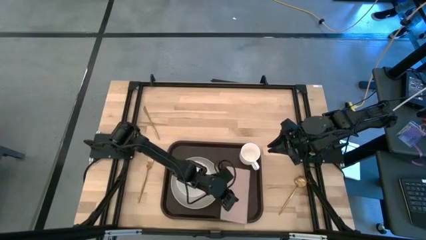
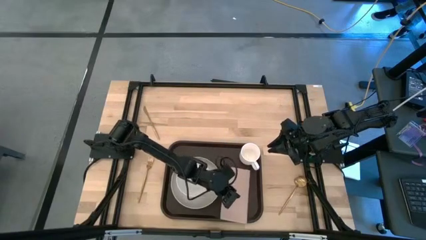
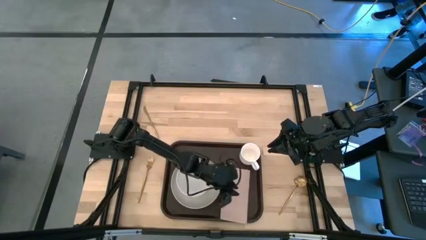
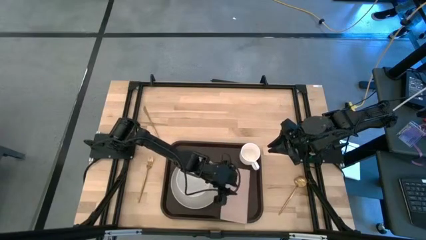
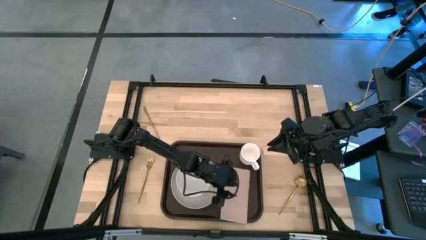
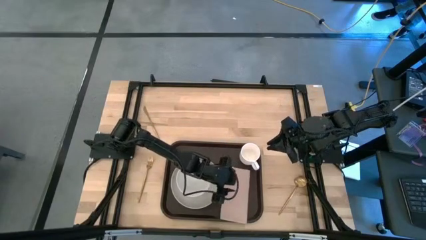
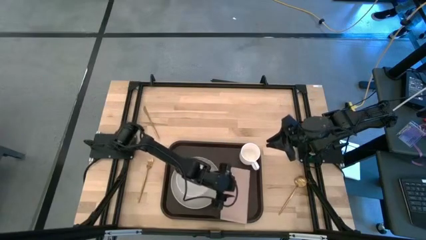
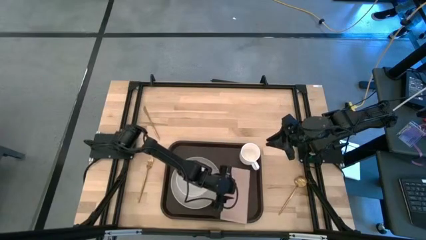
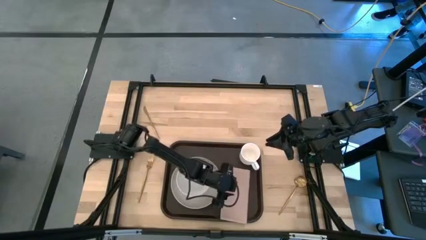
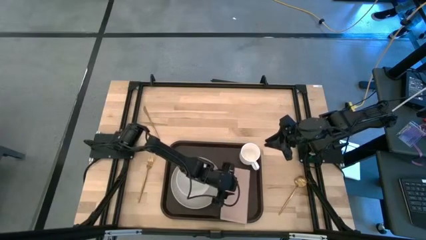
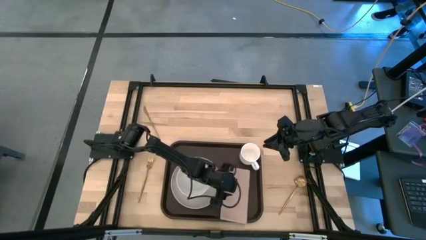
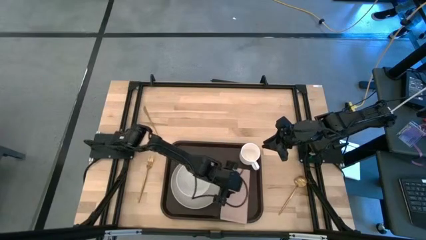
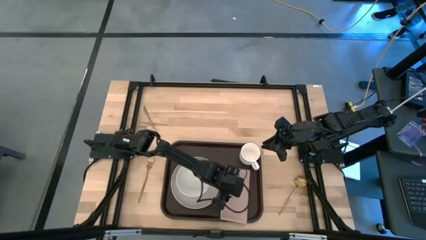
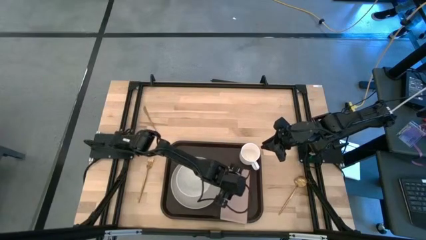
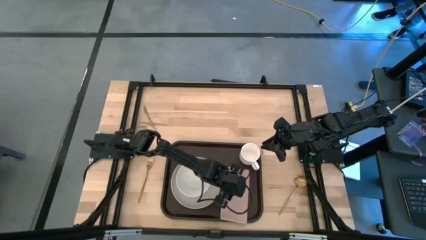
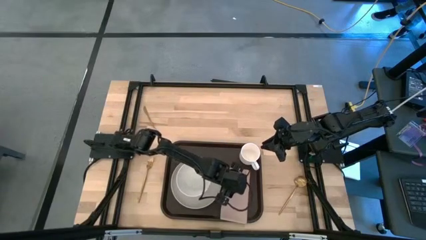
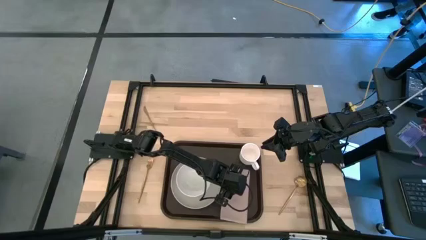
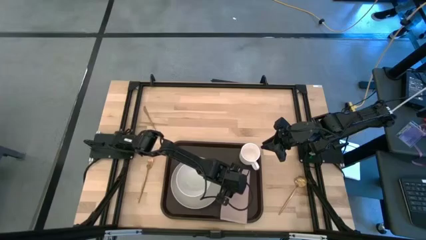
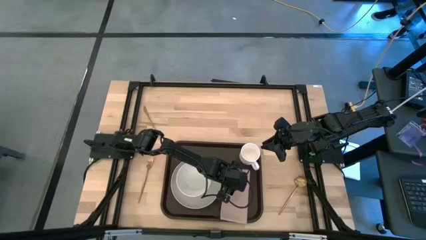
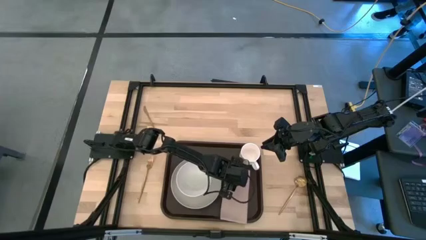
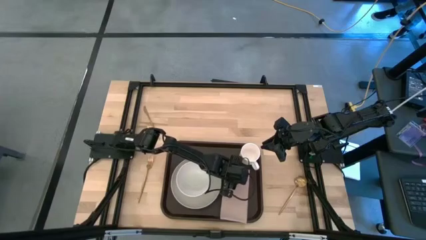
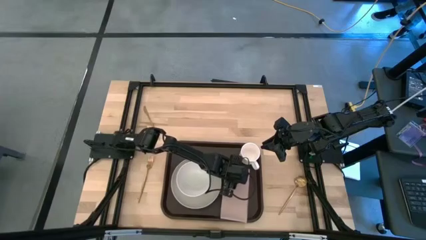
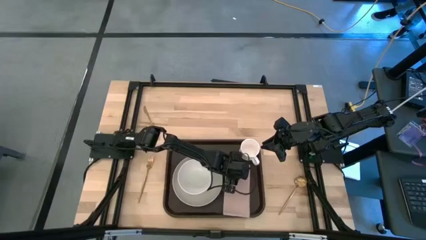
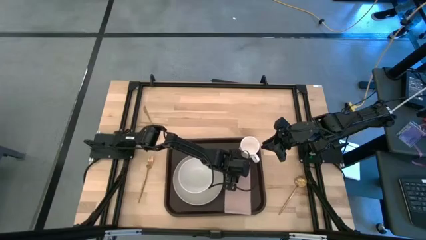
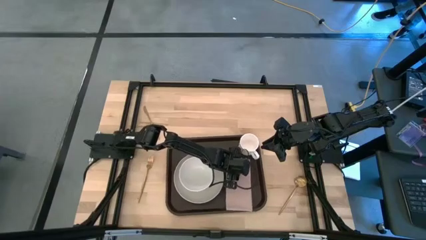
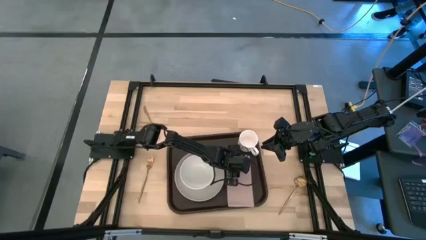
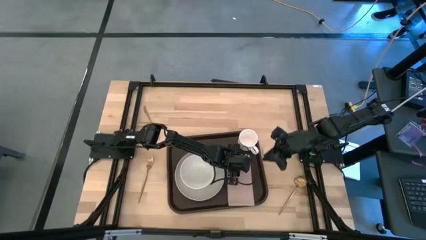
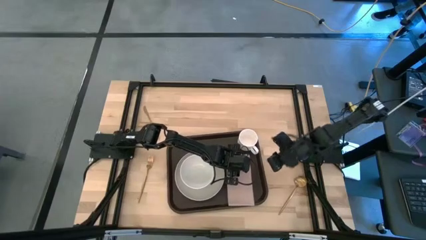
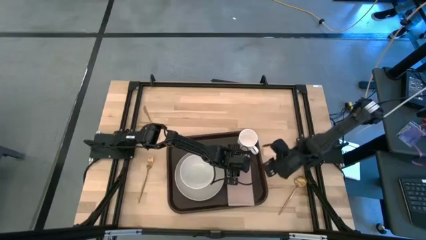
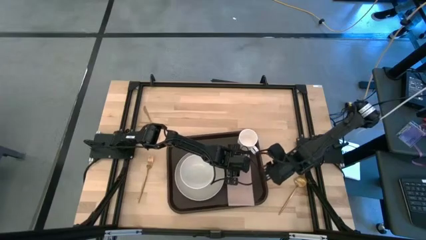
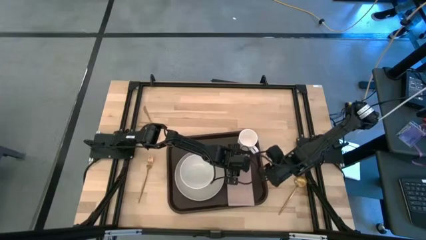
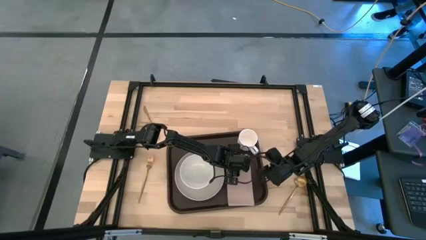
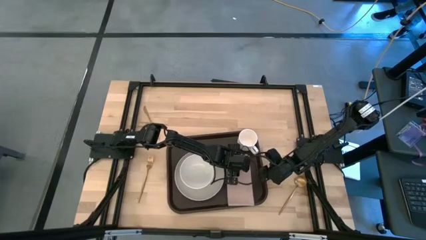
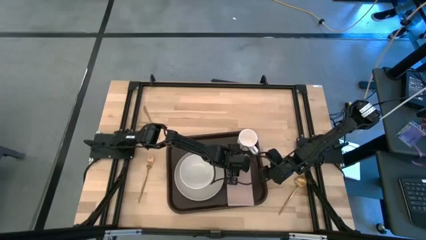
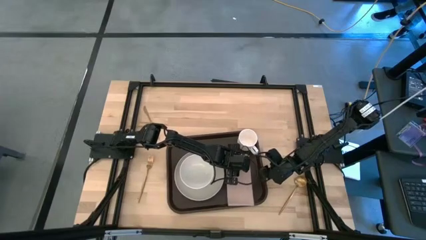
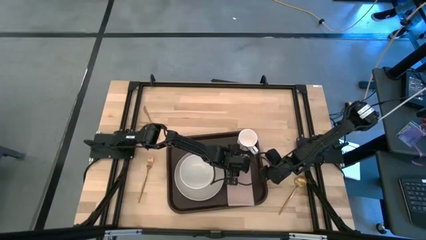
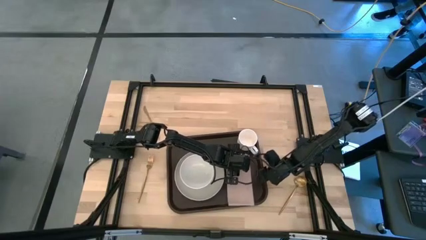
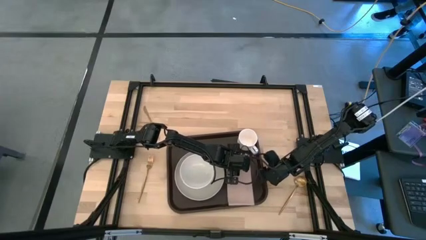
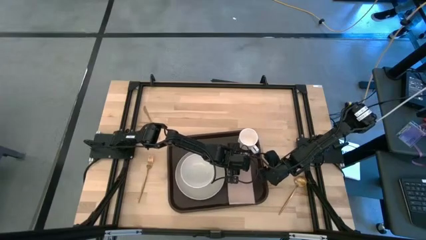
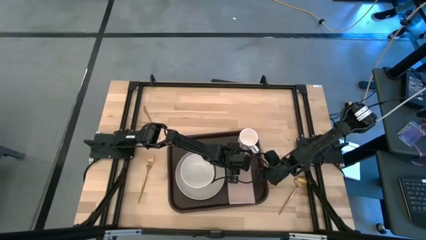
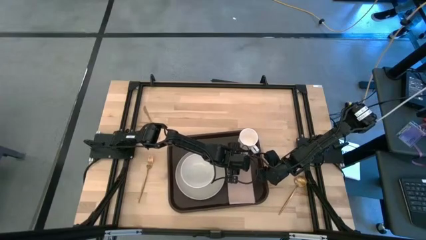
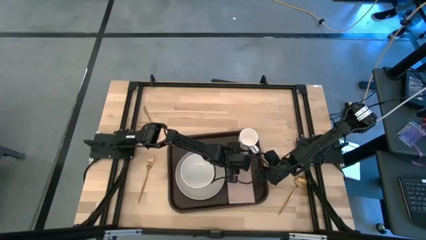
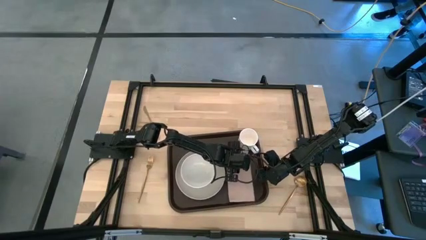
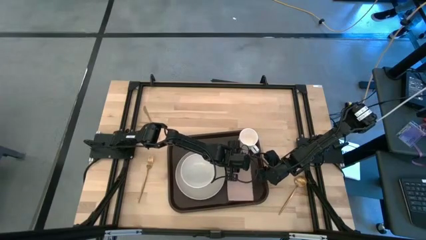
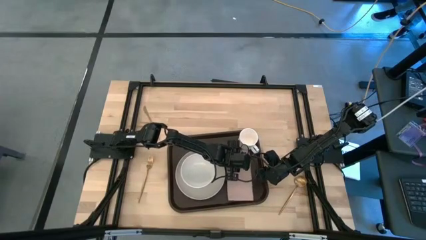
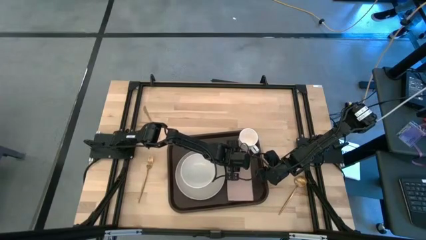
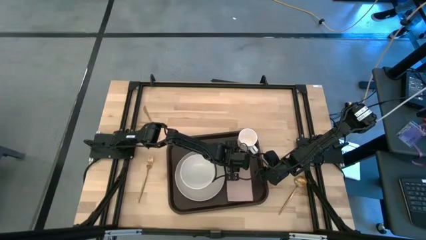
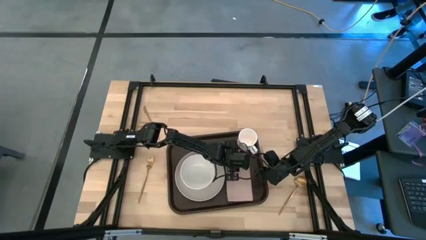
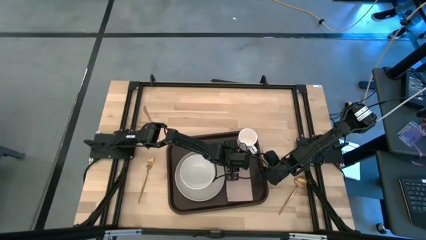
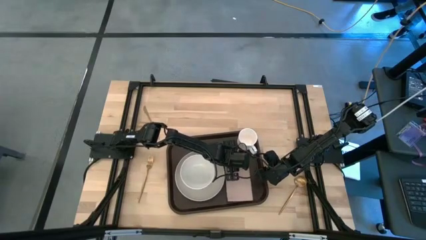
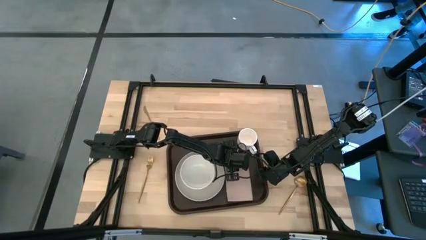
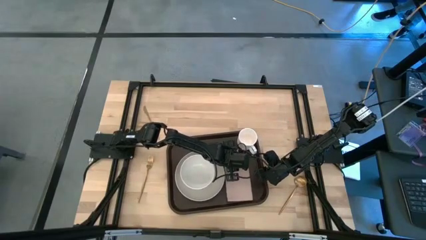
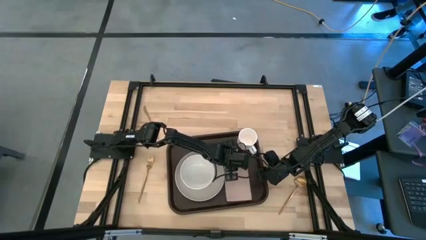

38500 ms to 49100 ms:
Task: Set up tray
Put the brown napkin below the white mug on the brown serving tray

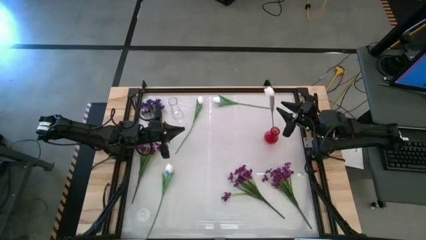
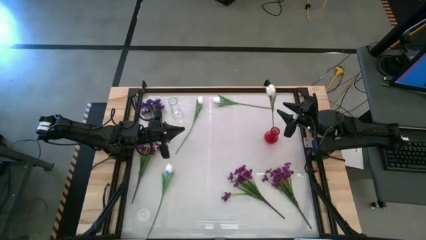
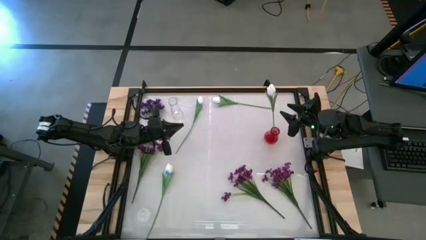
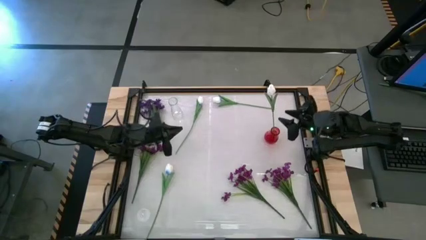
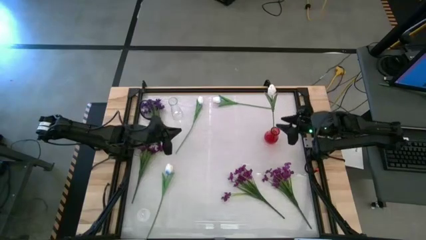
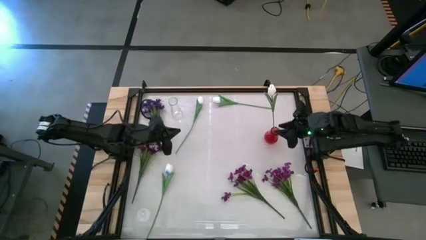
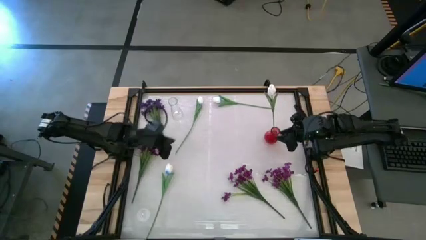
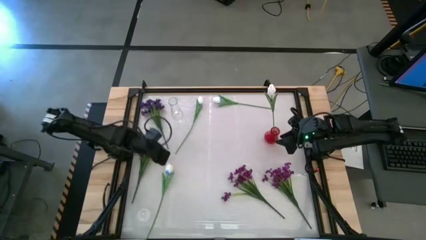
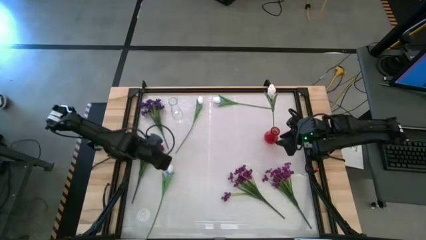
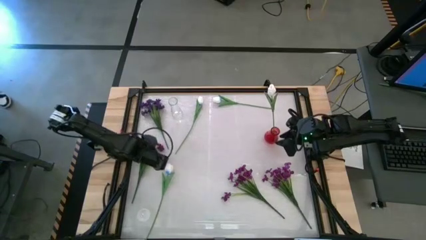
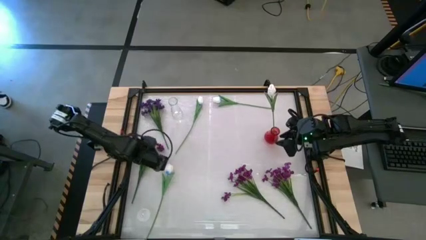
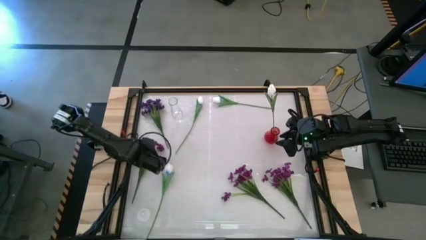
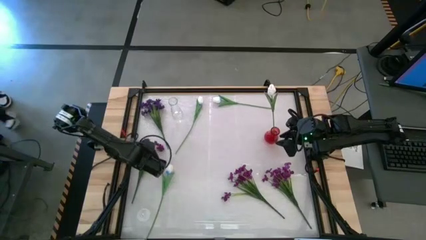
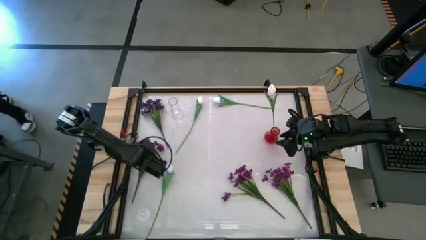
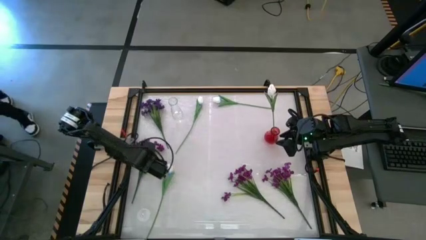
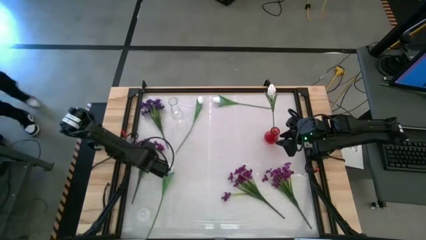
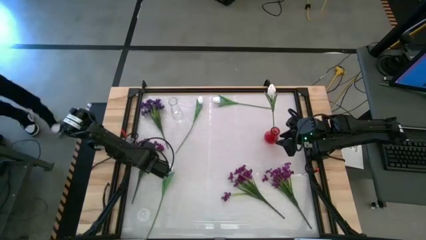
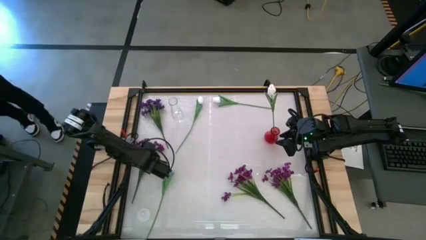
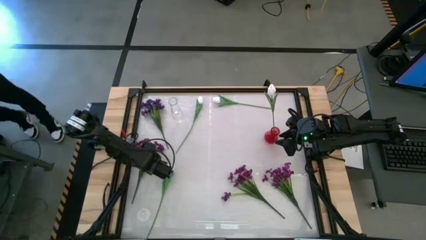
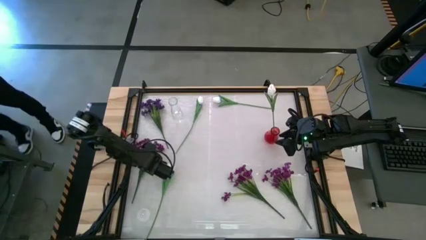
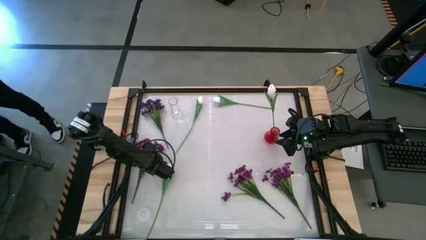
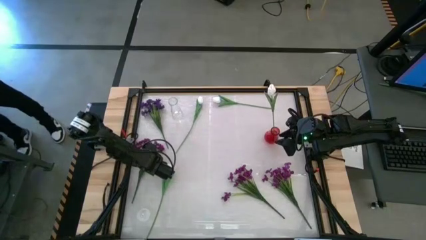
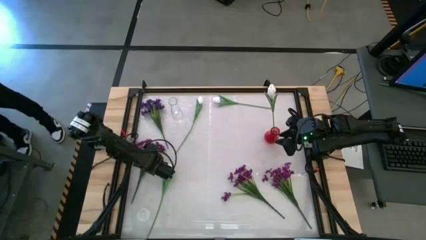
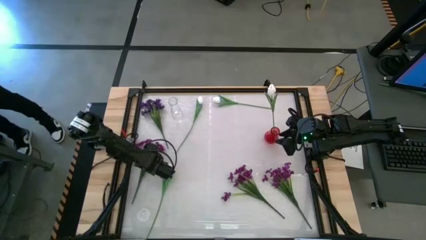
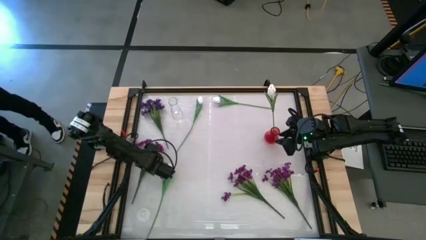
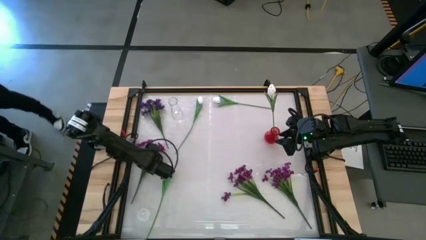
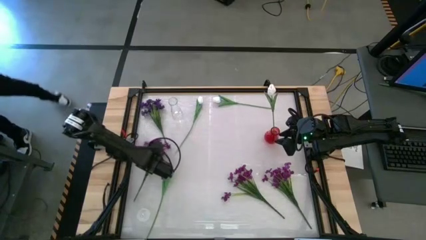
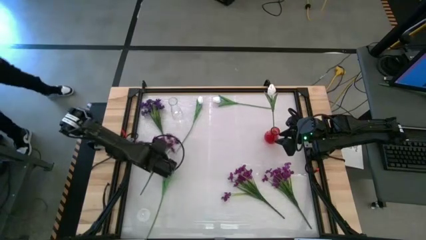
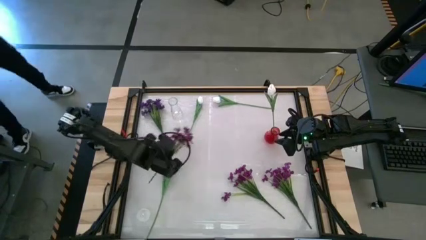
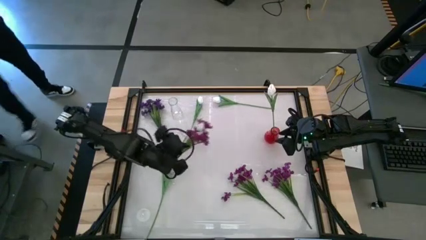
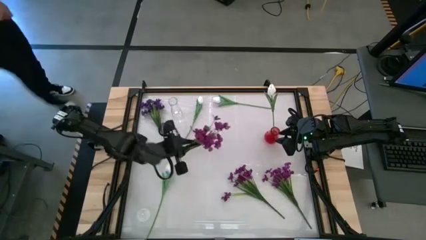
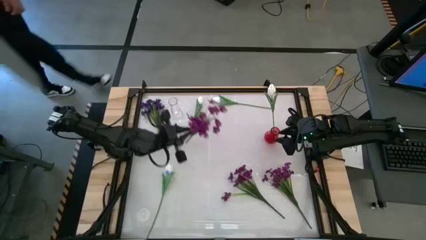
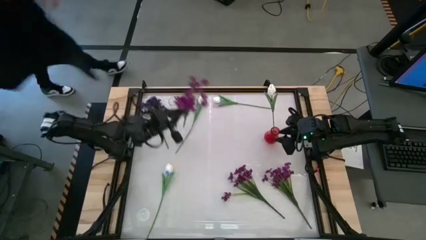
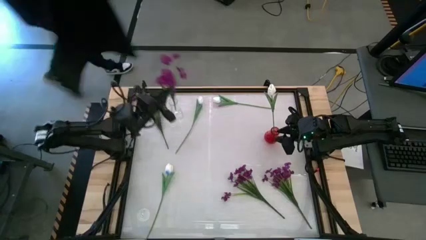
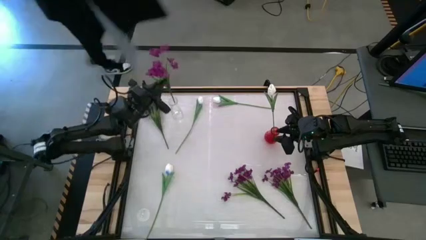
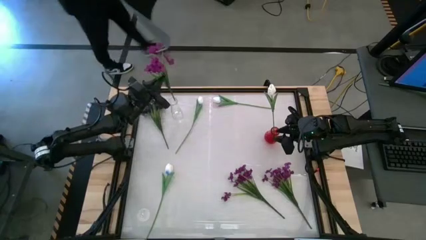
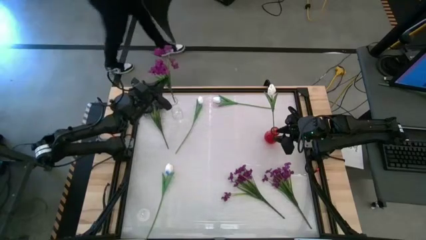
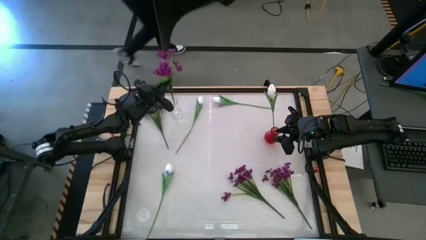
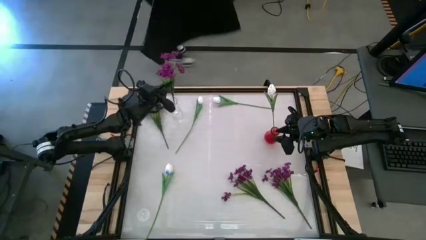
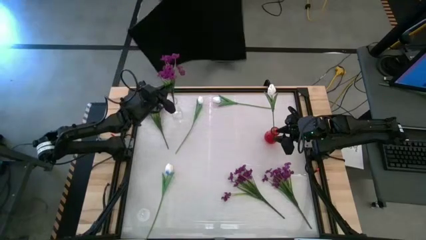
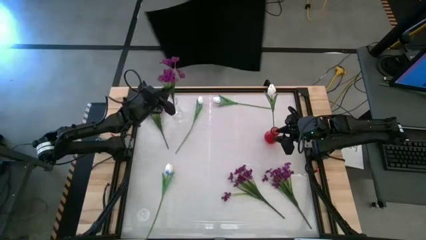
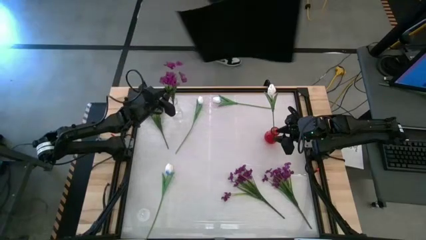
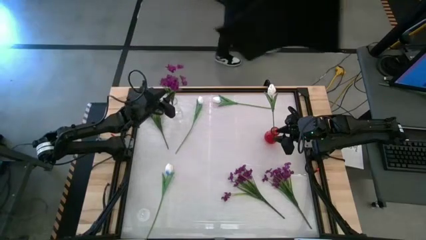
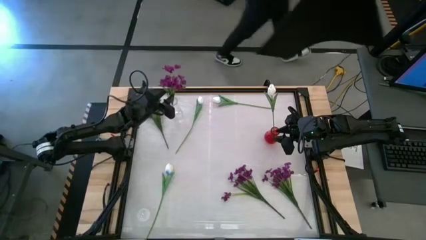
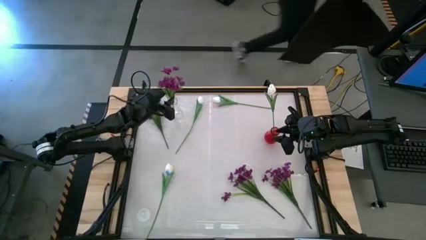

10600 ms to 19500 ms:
Task: Sort flowers into vase by color
Put the middle left violet flower into the transparent vase
